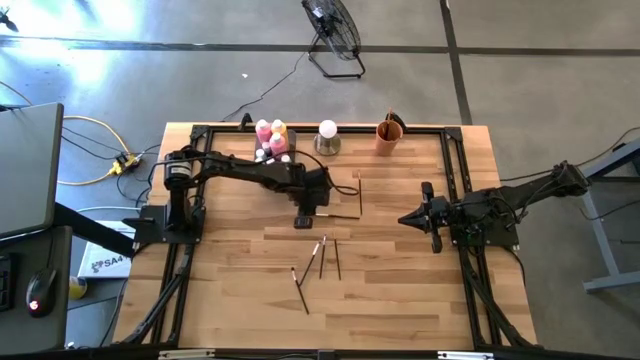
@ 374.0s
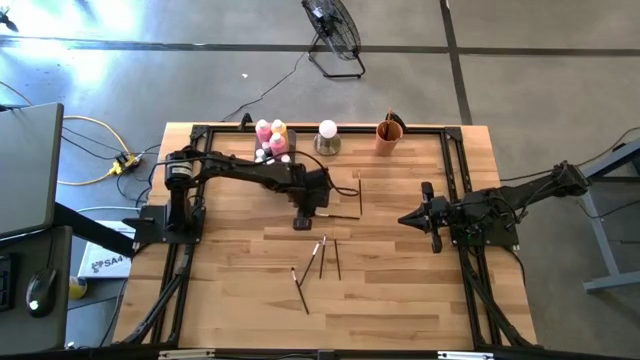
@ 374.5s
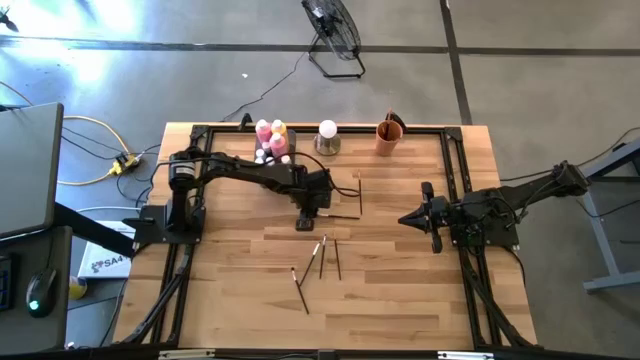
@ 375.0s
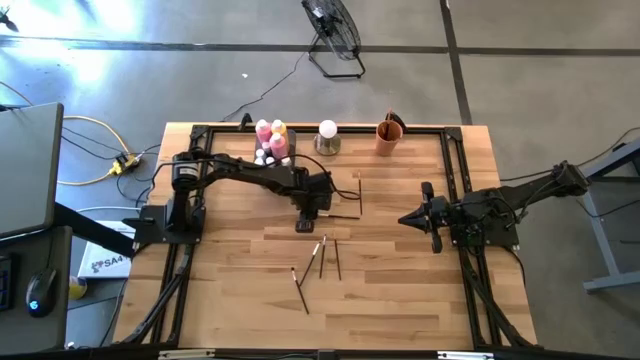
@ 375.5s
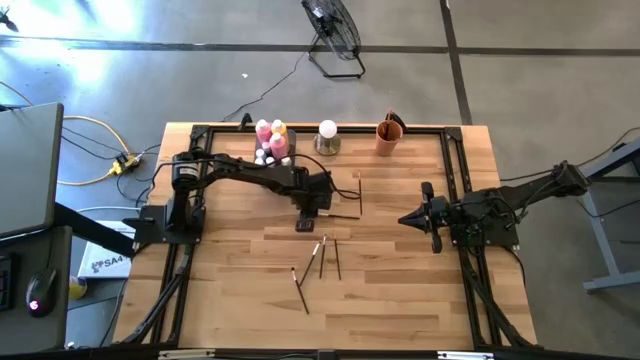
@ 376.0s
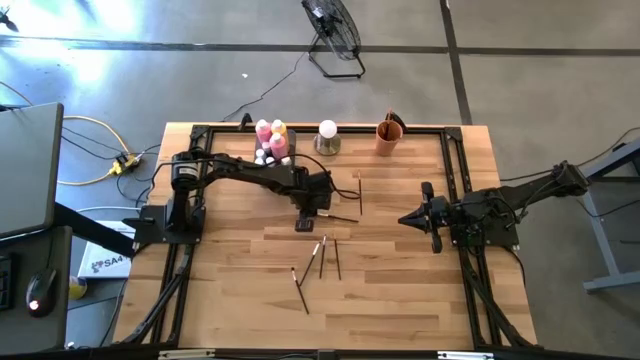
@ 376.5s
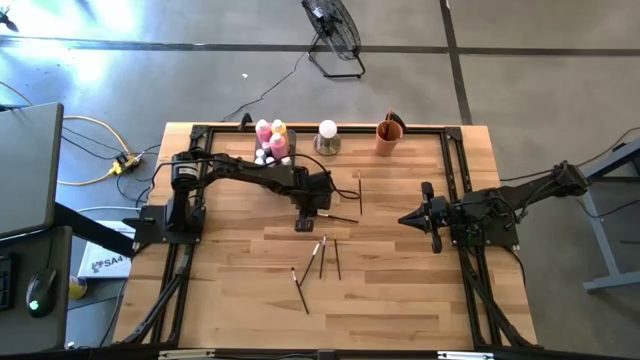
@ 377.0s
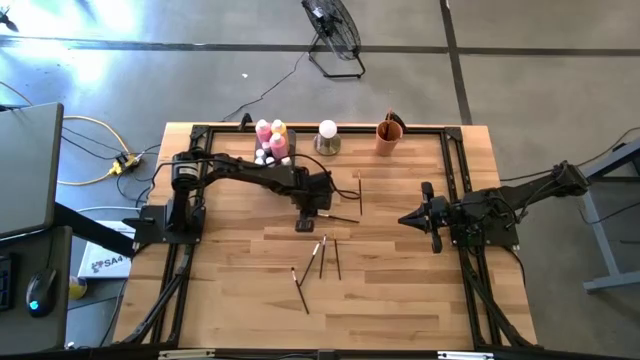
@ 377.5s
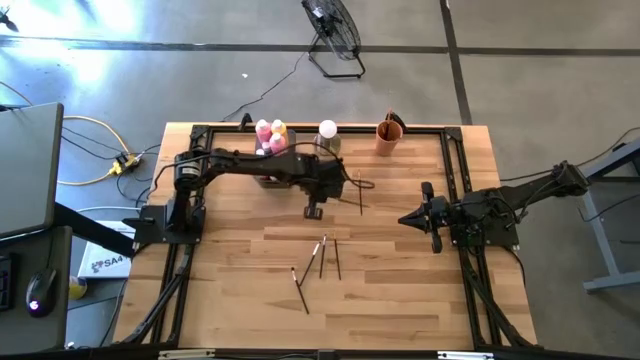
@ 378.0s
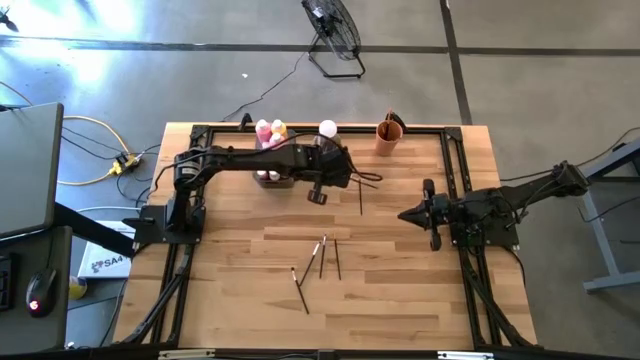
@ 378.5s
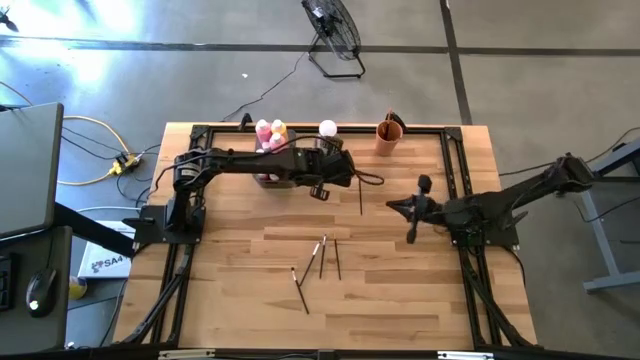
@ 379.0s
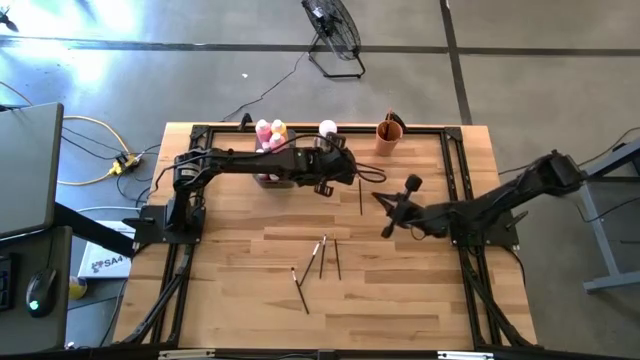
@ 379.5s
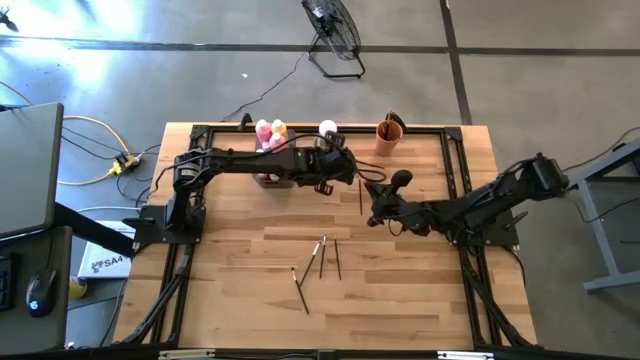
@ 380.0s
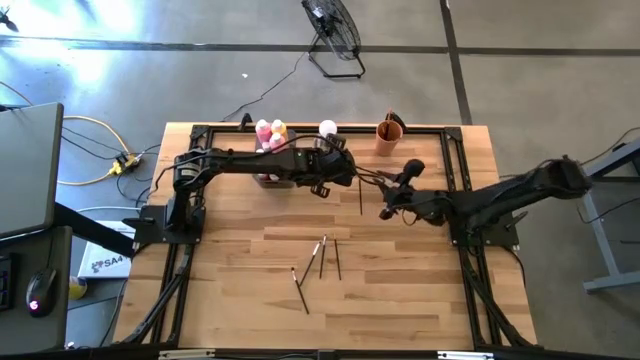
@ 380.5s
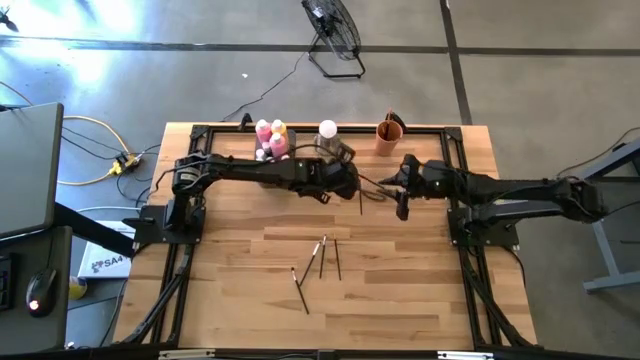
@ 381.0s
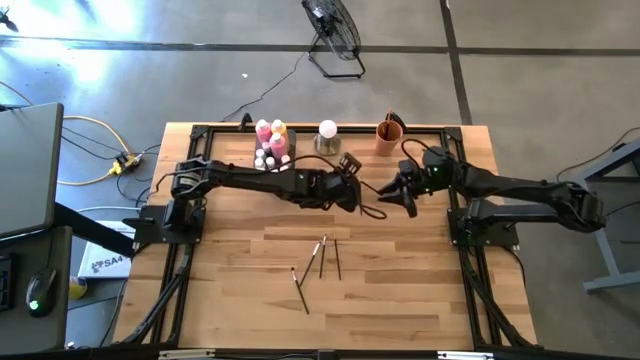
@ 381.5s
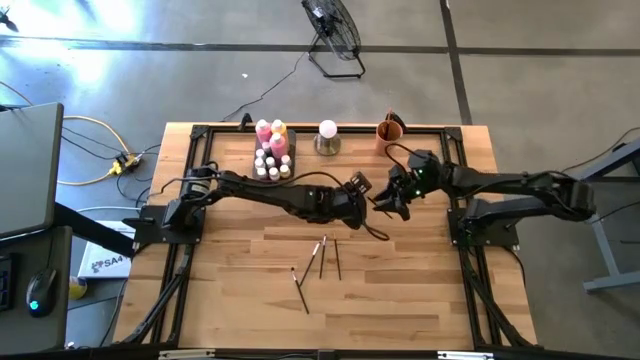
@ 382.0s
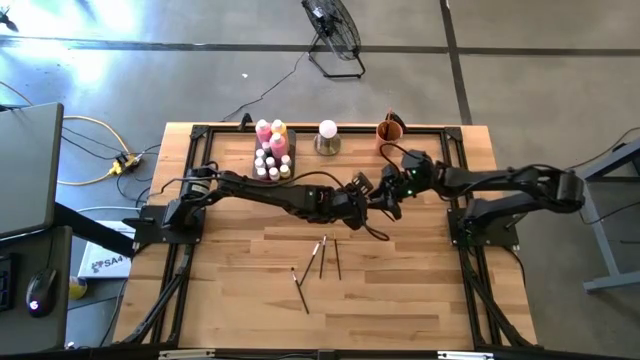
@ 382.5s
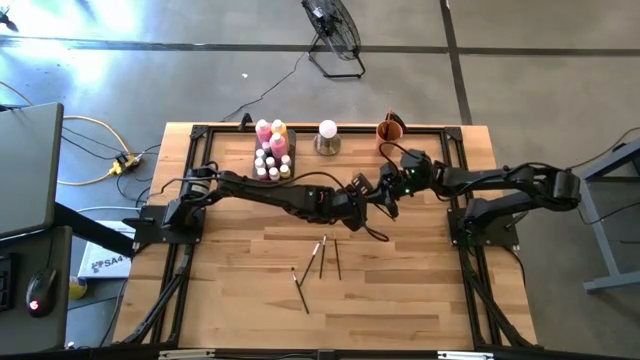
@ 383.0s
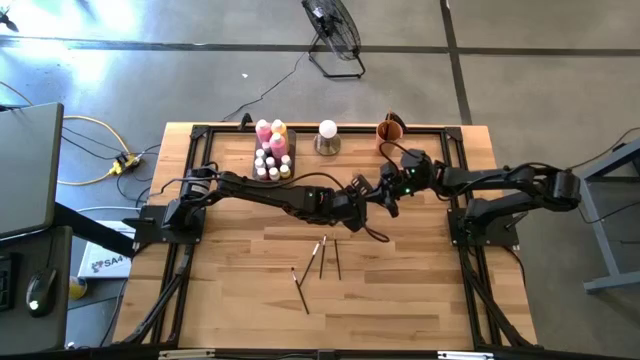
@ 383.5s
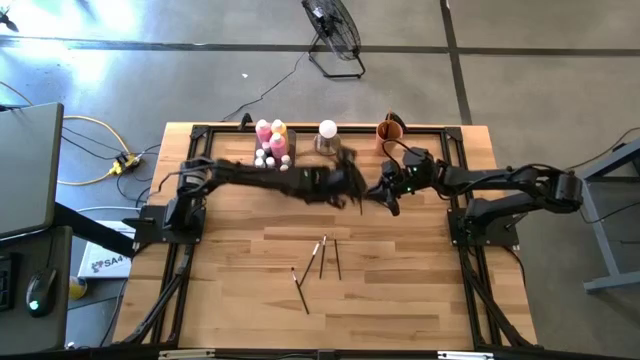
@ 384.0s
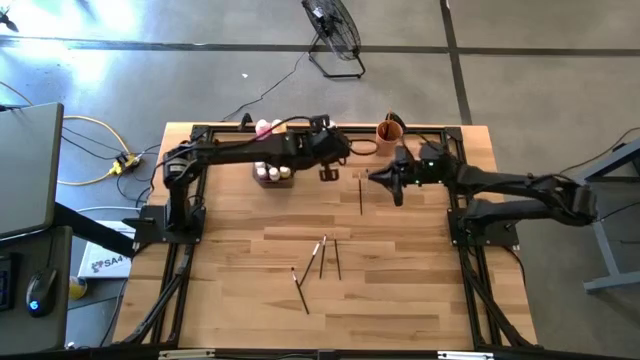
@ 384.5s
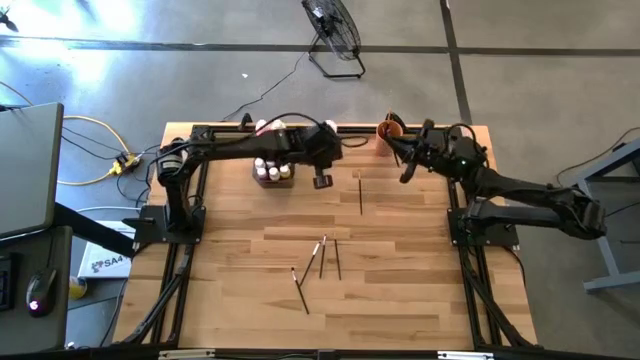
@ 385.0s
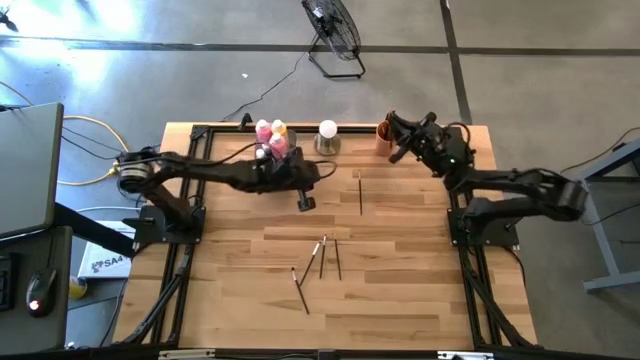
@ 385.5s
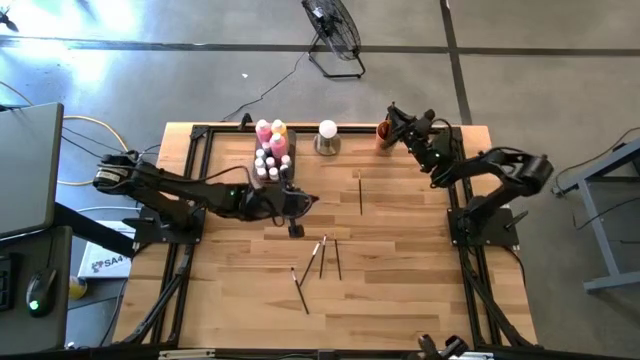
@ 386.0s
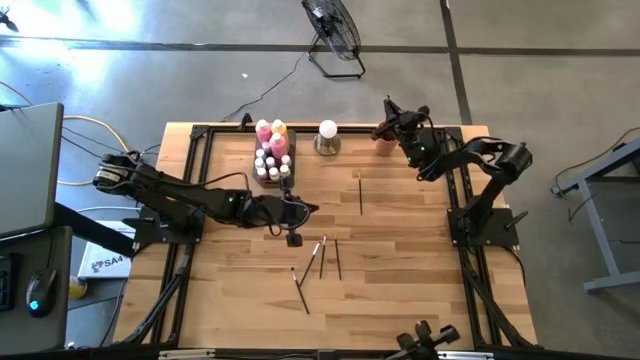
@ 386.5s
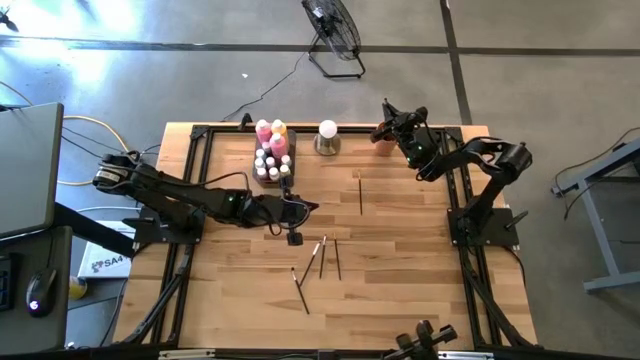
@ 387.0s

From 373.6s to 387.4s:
Task: Pick & Place Paint Supplies
Put the silver paintbrush into the orange cup

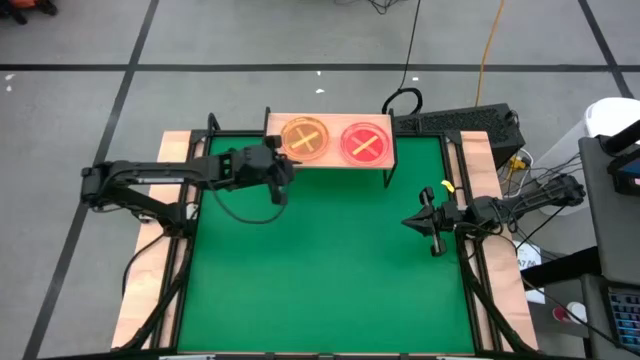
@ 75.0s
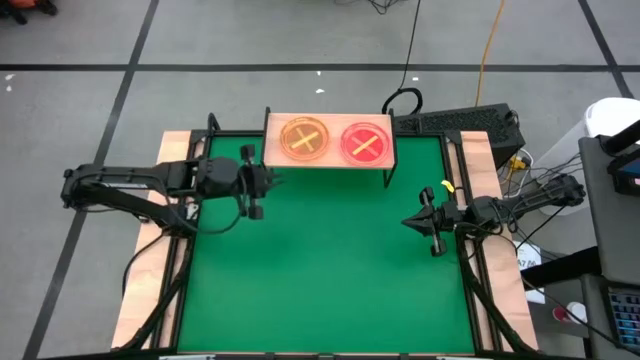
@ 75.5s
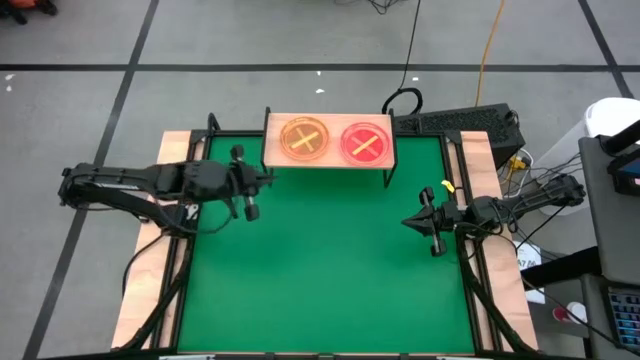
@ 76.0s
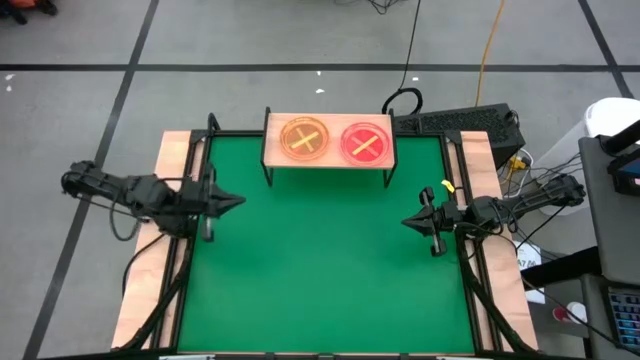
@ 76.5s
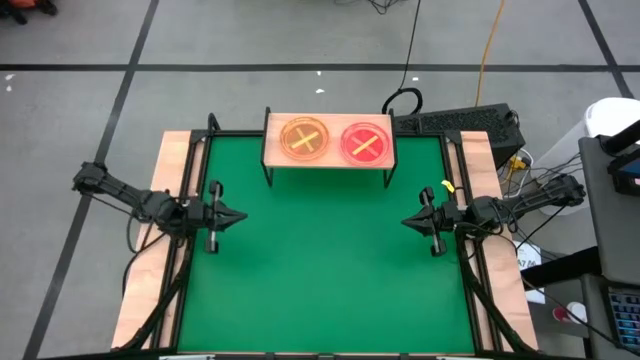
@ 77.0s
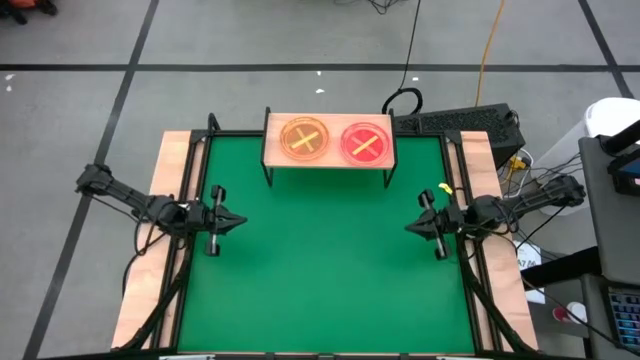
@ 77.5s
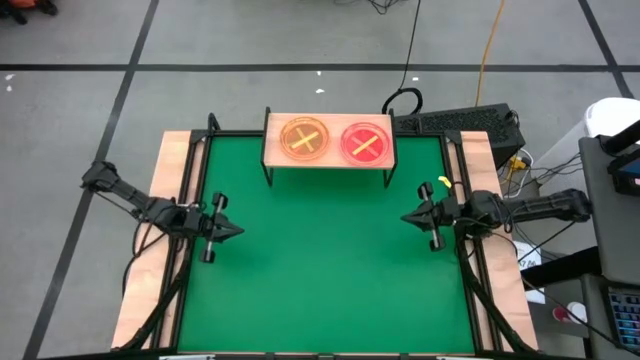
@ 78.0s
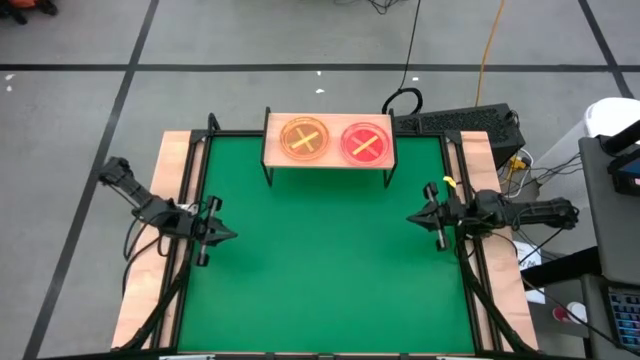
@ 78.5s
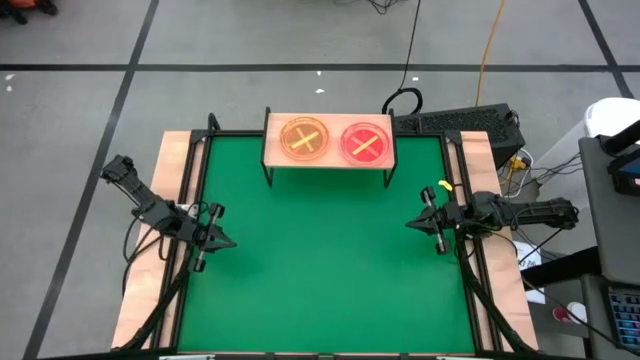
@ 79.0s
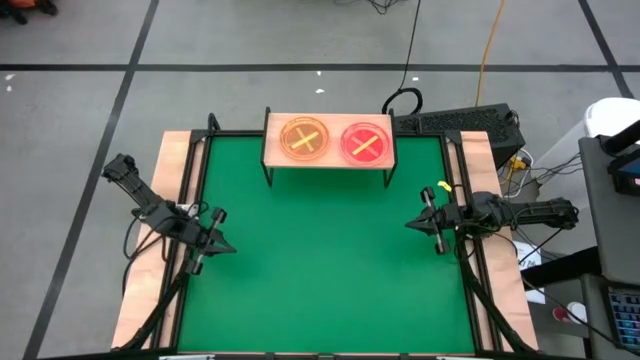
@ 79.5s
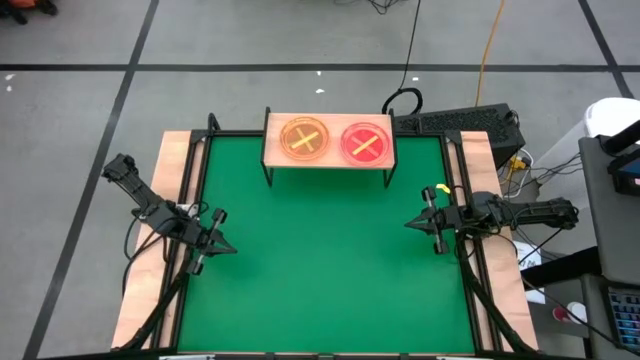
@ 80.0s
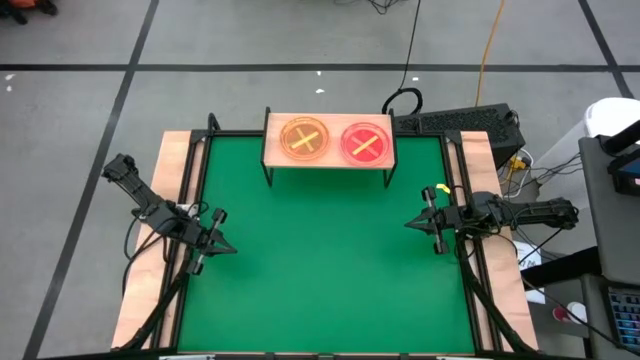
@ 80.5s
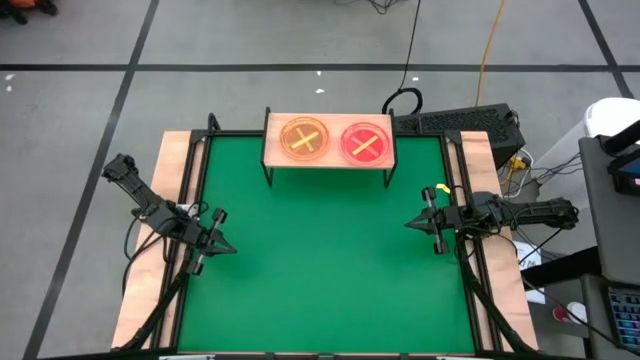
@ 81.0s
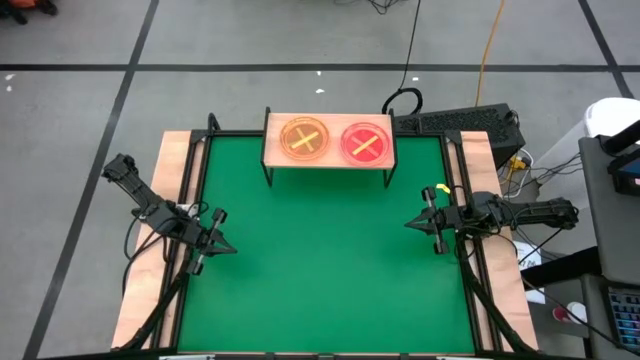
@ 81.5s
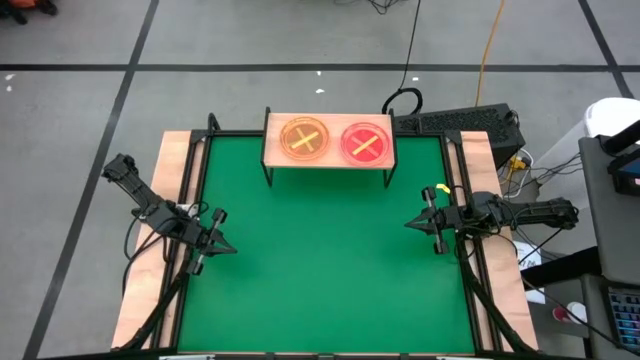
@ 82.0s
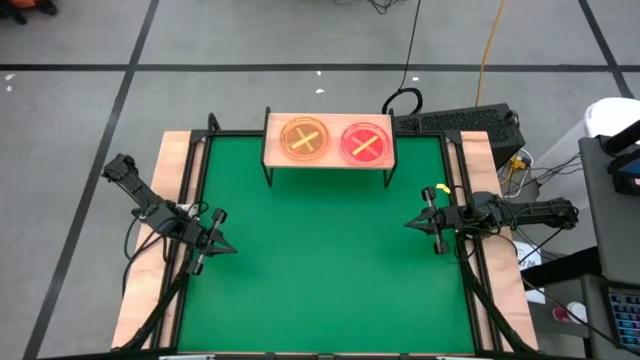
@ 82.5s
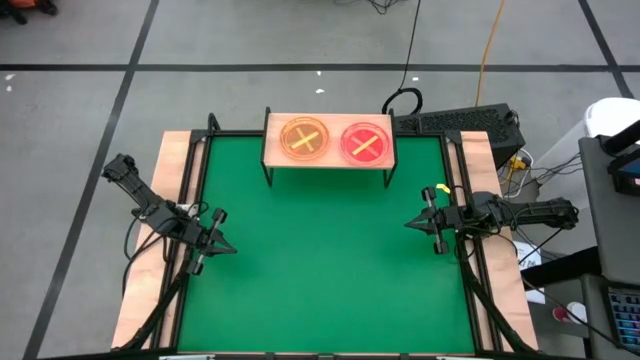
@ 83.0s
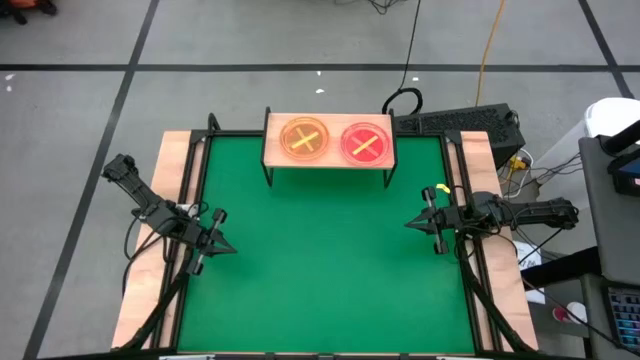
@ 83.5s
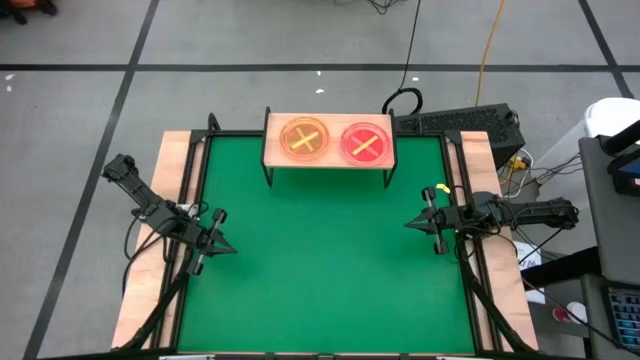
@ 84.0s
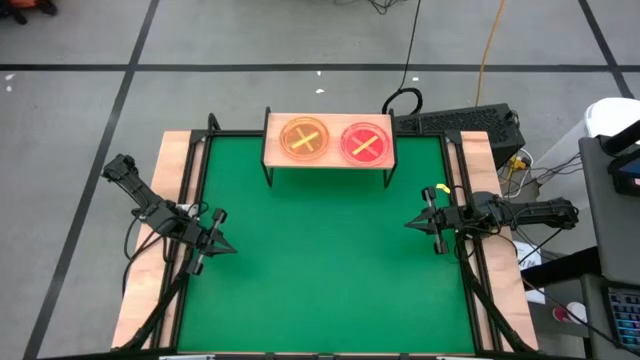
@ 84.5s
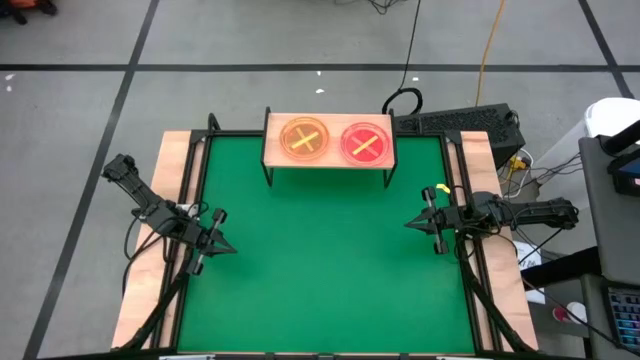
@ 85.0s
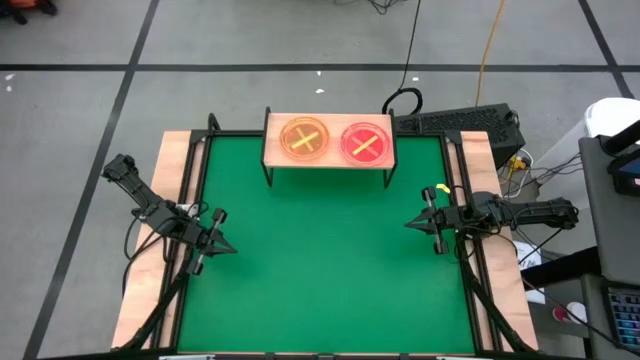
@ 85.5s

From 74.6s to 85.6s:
Task: Place and stack plates onto a shelf
Return to Home Position
